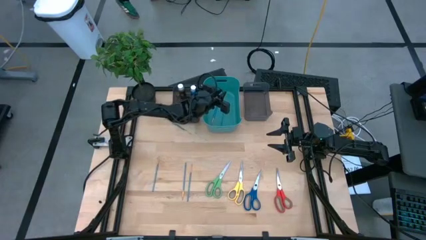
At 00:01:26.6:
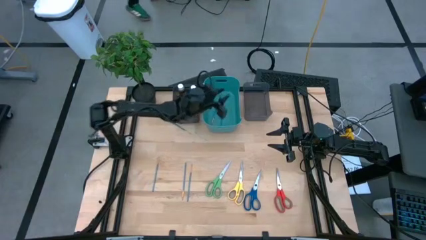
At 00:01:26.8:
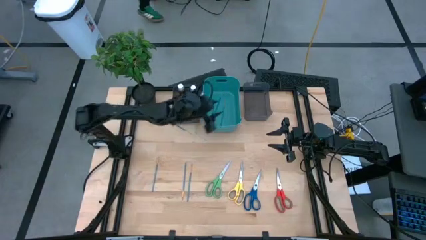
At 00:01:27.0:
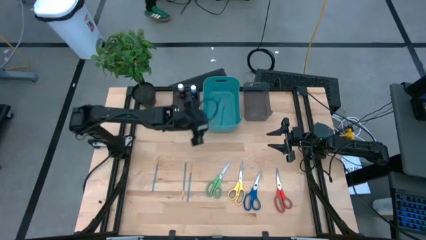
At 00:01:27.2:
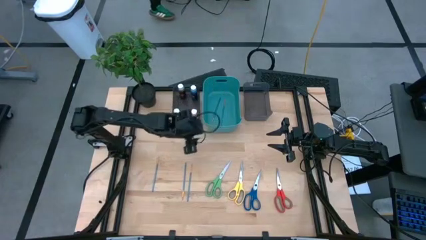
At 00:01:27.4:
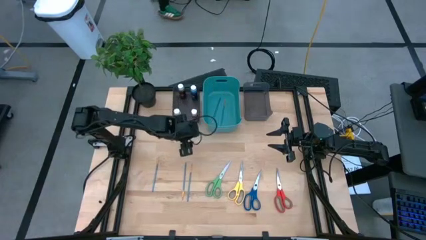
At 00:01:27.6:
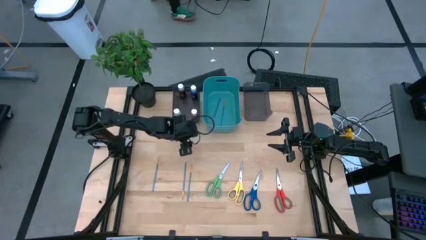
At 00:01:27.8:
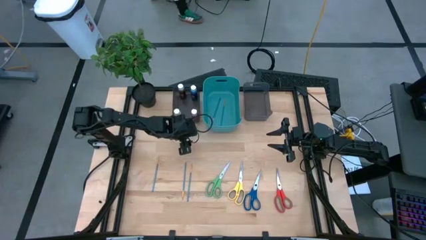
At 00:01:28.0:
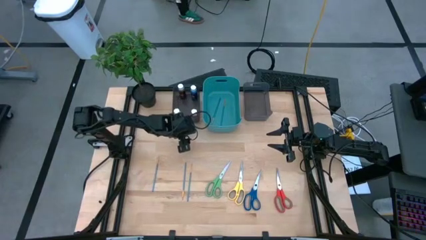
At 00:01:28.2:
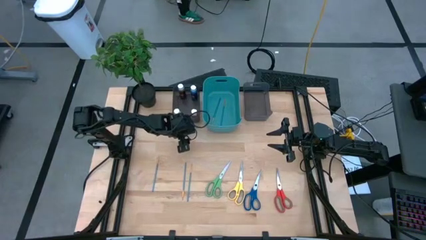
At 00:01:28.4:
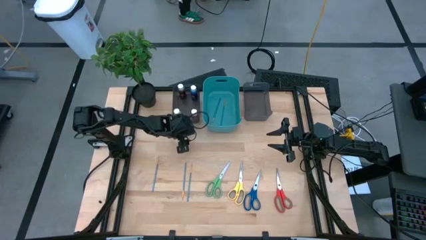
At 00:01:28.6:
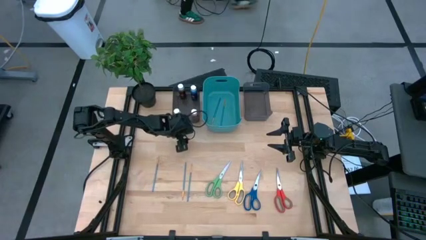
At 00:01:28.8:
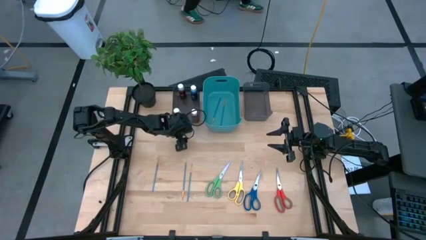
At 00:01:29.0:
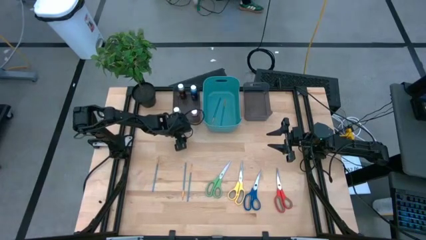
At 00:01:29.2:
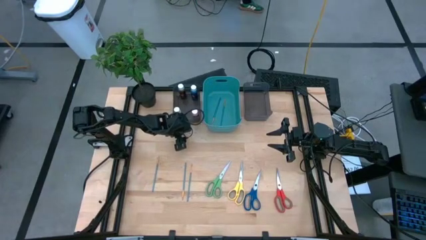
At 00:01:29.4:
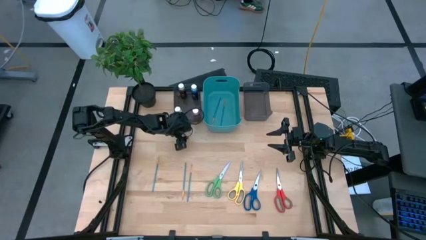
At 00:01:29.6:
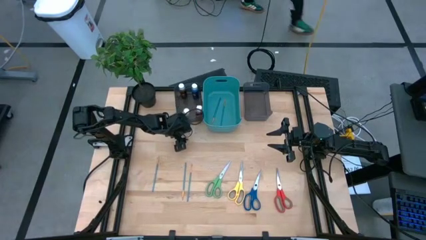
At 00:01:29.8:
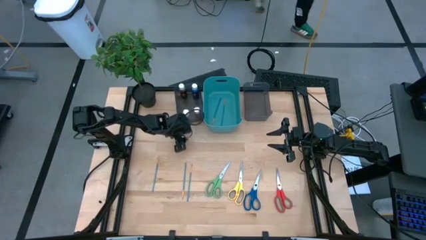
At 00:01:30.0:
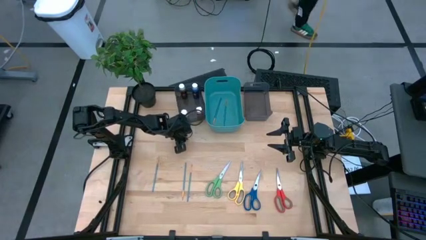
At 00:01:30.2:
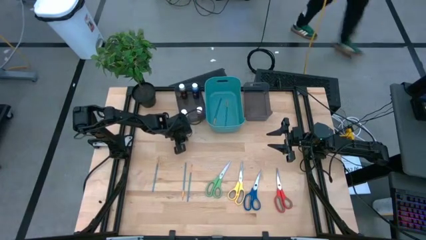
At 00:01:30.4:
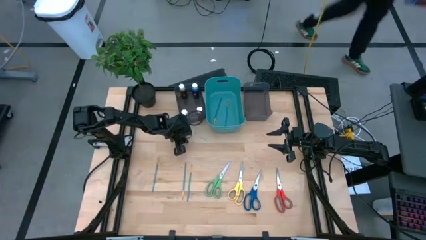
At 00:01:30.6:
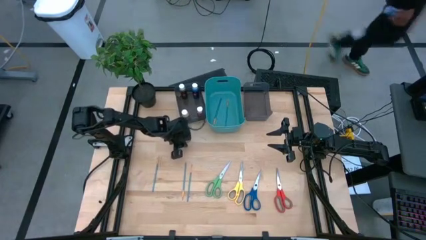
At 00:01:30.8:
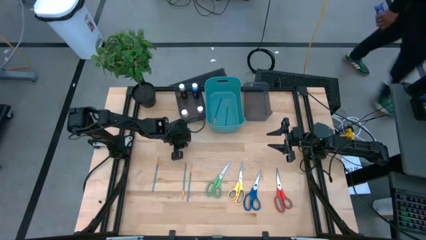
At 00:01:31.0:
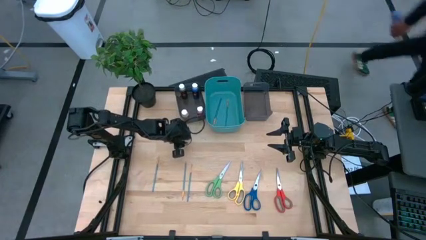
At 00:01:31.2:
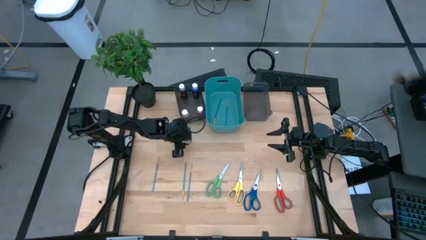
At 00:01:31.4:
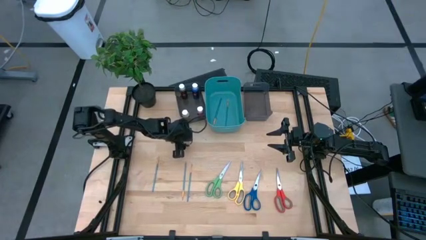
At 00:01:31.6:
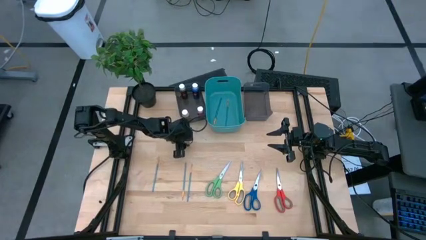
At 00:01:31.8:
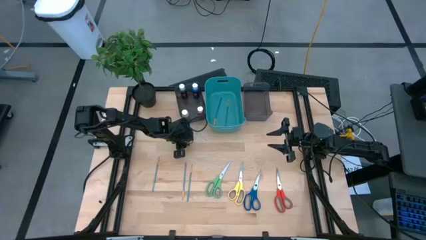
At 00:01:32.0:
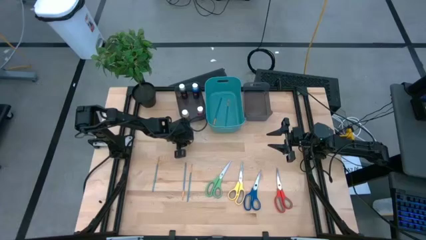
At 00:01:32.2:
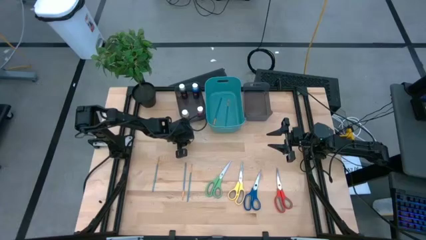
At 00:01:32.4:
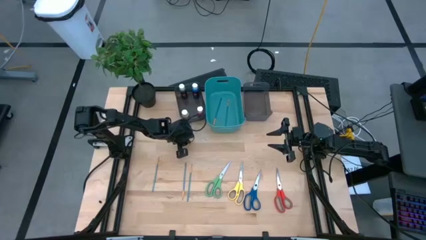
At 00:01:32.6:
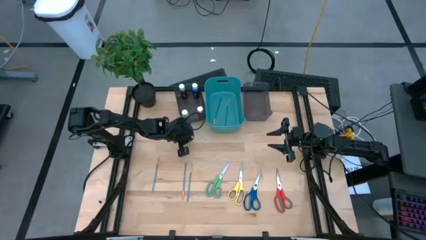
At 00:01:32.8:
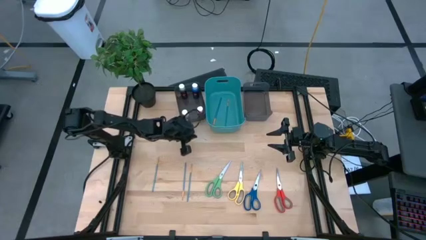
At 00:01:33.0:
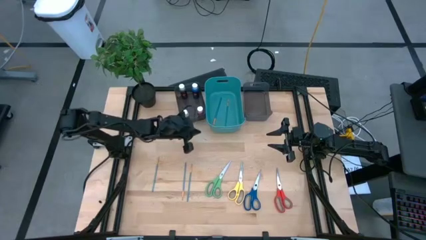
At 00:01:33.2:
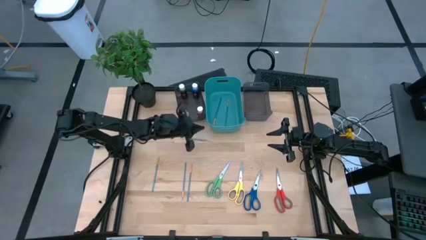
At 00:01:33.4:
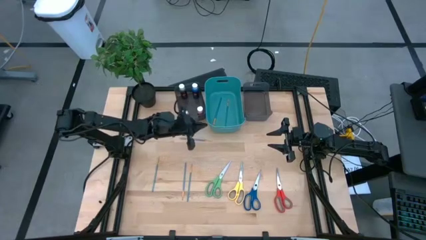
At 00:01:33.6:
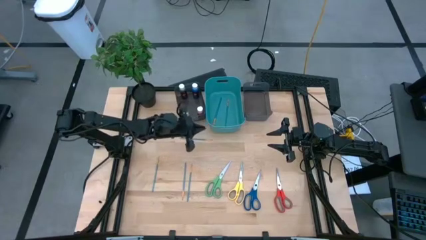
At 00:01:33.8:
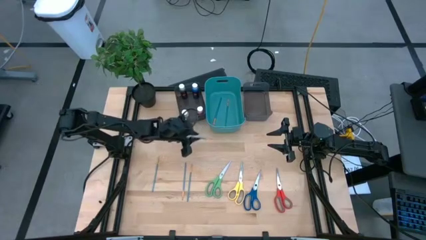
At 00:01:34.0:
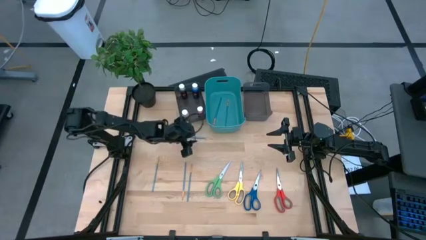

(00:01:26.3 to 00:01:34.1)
Task: Pick & Place Paint Supplies
Put the blue paint brush into the blue bin

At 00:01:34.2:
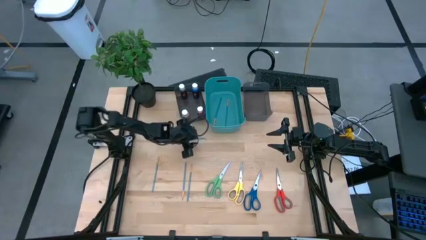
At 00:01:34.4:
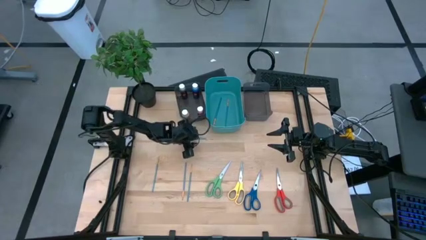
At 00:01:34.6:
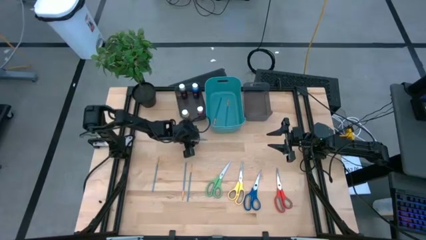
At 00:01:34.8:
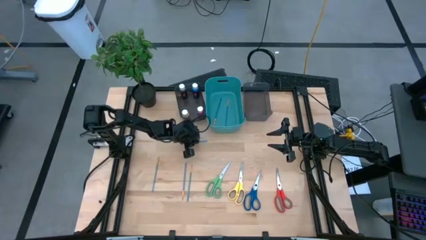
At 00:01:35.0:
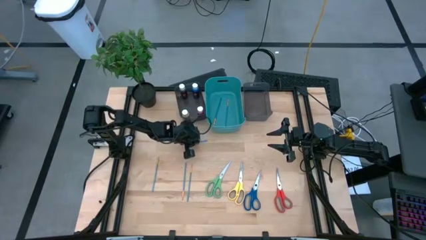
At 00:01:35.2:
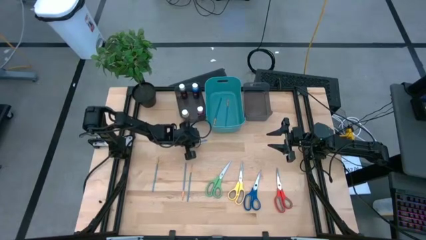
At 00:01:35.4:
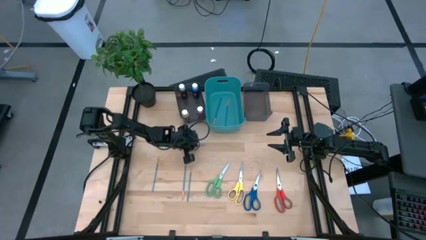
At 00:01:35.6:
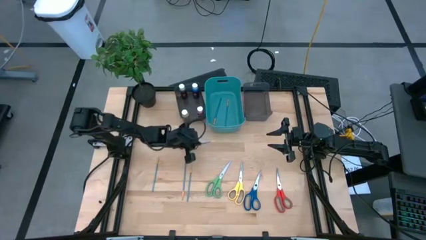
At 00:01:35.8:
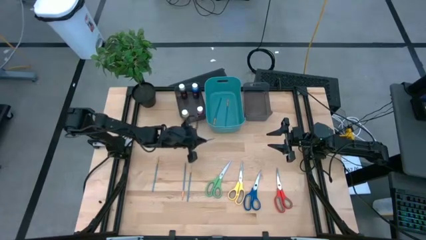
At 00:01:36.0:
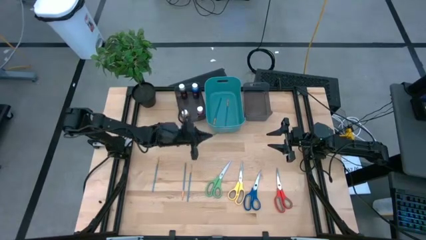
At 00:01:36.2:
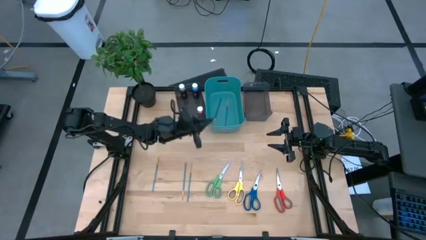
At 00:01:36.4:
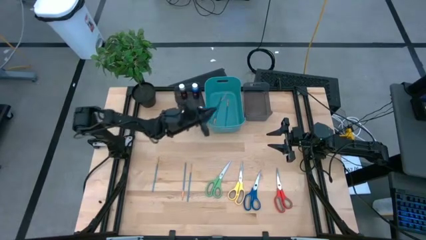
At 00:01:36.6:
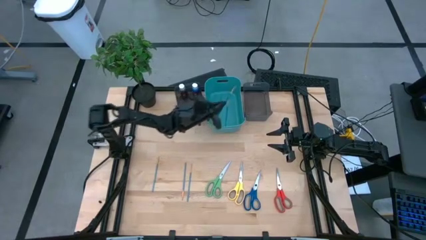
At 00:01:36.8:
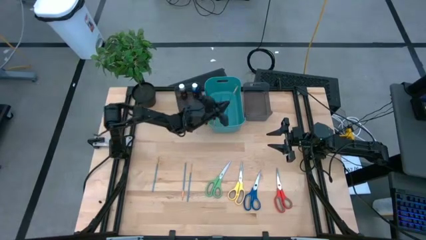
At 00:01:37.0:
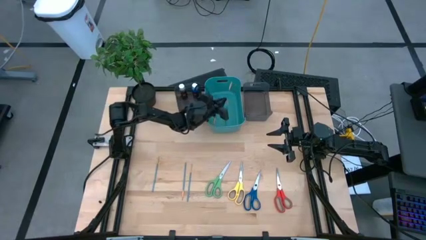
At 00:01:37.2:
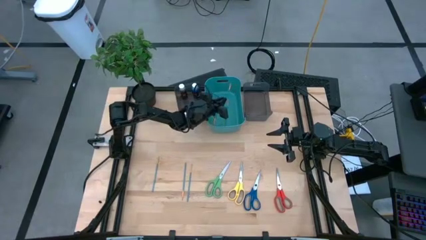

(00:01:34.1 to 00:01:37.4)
Put the blue paint brush into the blue bin

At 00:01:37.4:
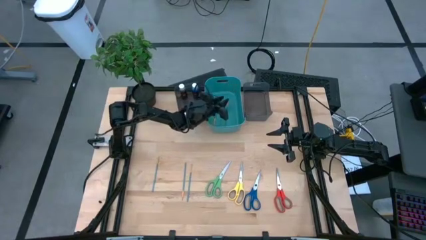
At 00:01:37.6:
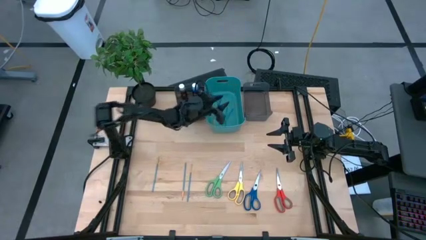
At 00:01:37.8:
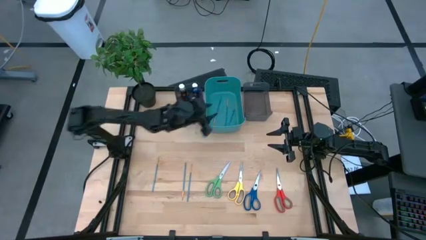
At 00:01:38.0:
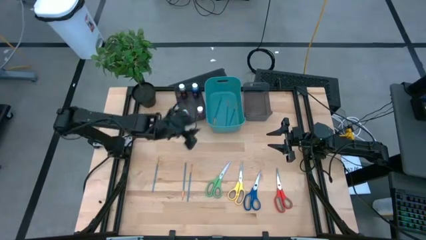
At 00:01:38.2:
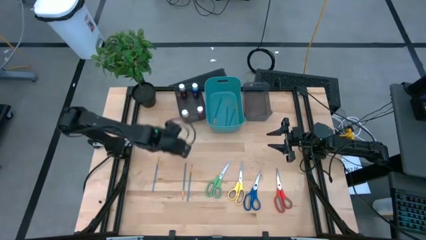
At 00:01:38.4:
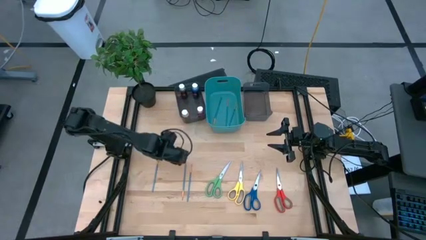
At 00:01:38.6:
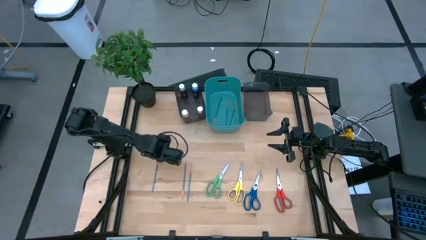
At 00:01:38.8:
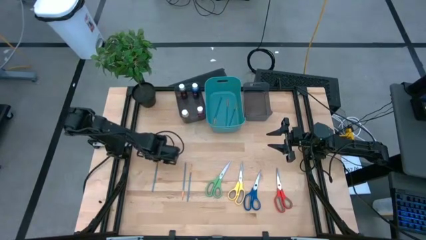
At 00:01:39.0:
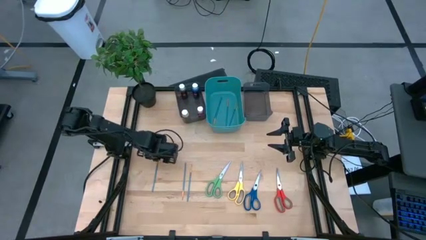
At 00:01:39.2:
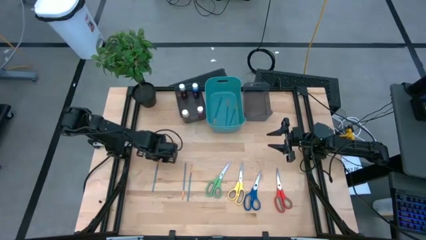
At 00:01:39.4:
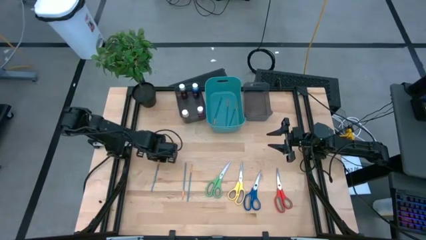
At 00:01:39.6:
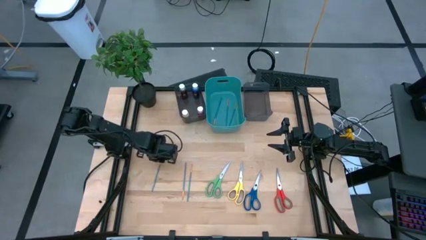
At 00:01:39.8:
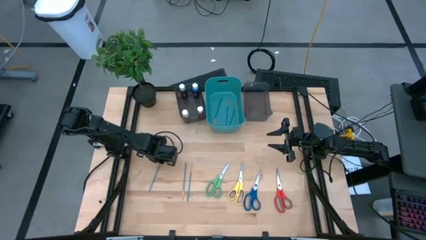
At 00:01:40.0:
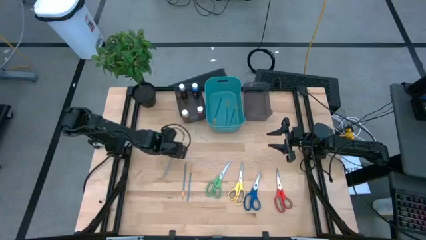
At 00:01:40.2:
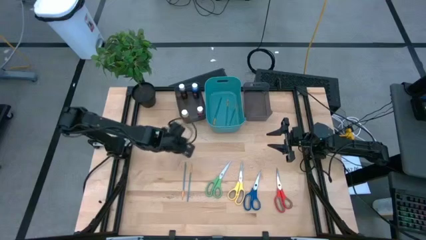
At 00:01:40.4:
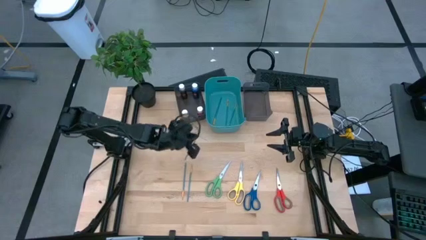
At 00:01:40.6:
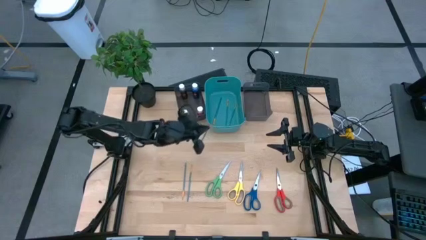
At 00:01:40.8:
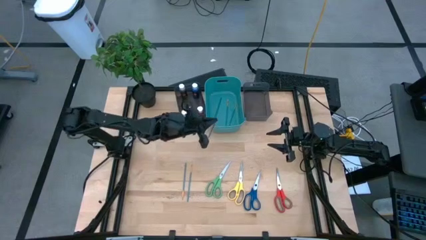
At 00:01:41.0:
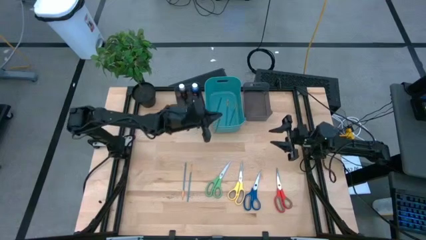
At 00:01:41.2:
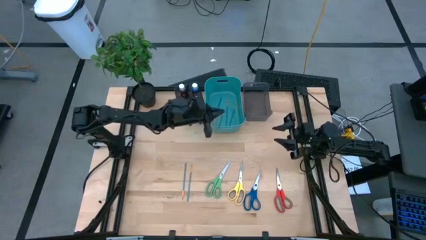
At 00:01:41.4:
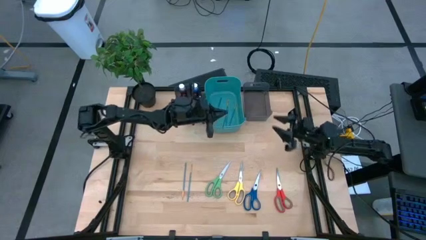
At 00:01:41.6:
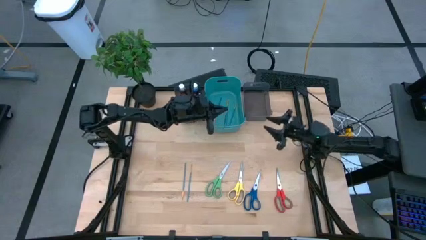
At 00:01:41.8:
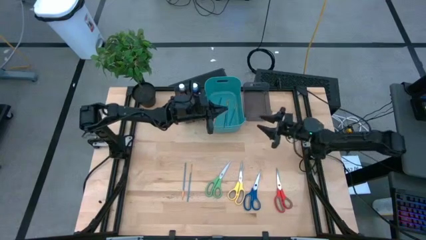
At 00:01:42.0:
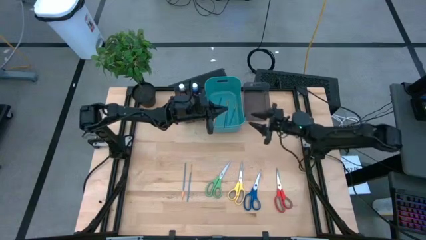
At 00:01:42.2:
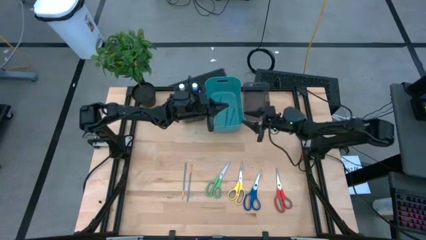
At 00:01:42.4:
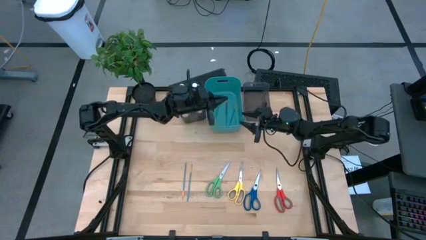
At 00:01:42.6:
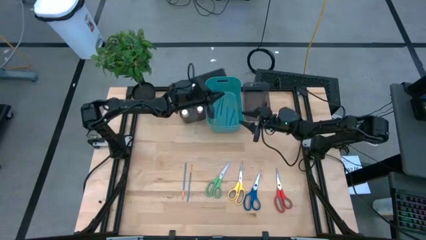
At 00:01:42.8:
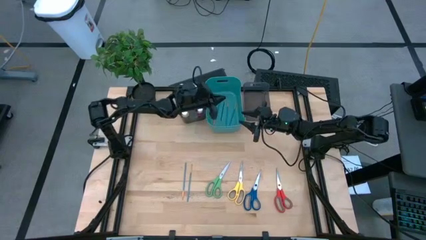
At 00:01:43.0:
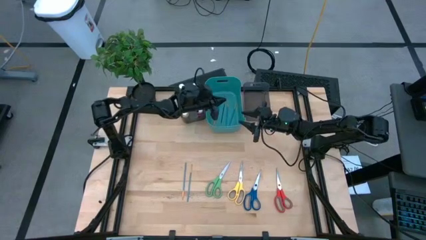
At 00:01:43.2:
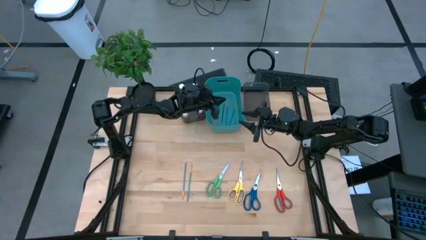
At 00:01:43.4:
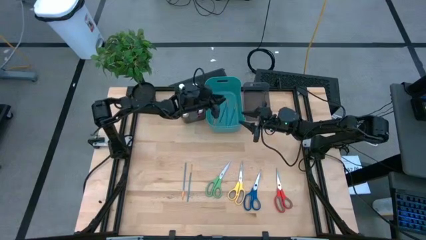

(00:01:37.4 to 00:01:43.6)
Put the blue paint brush into the blue bin
